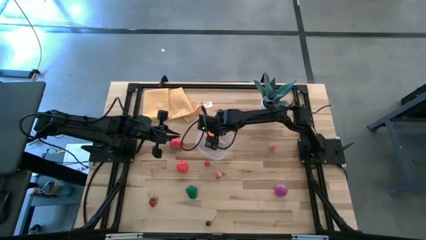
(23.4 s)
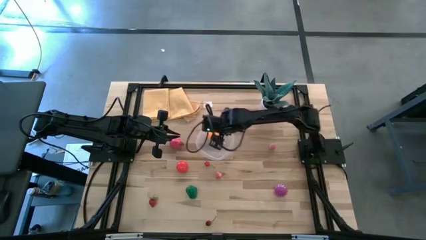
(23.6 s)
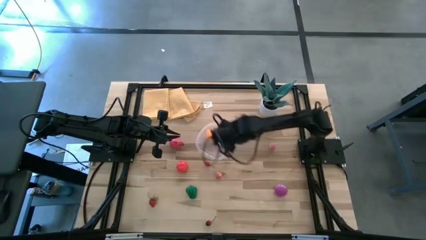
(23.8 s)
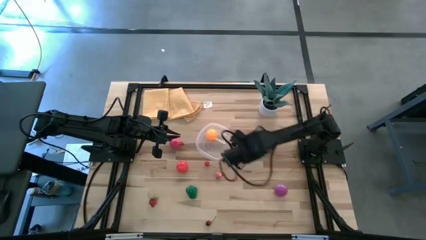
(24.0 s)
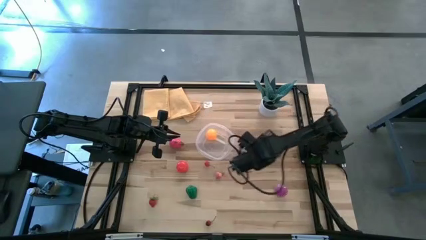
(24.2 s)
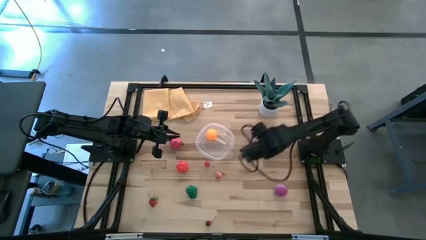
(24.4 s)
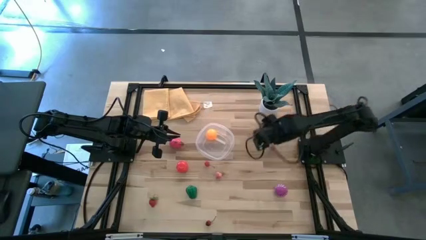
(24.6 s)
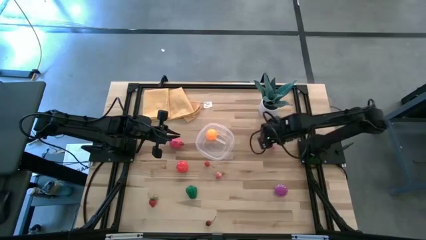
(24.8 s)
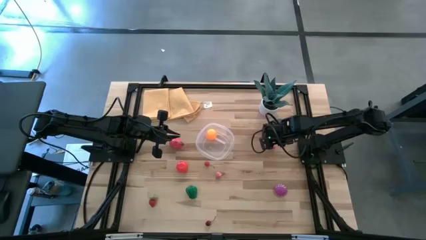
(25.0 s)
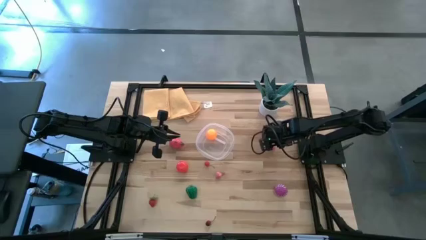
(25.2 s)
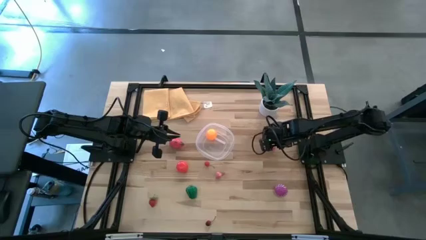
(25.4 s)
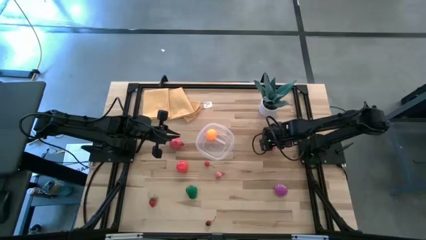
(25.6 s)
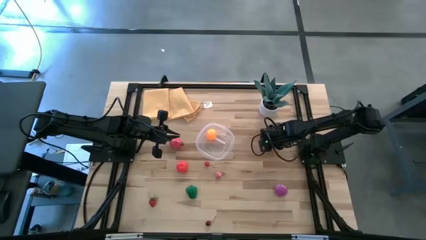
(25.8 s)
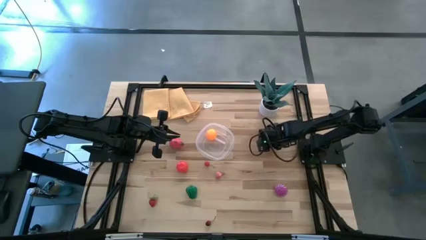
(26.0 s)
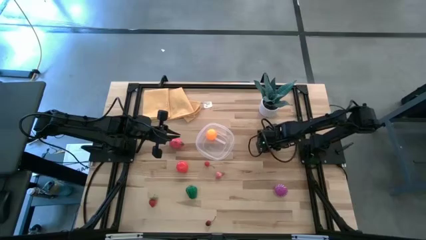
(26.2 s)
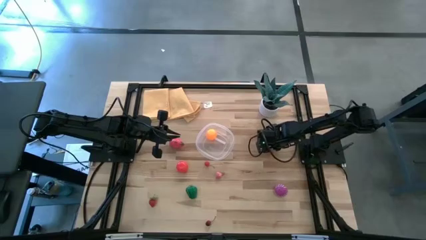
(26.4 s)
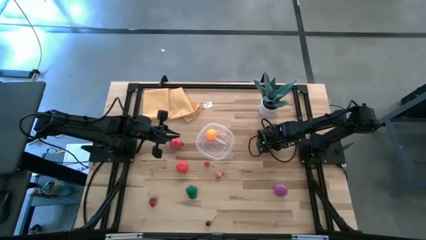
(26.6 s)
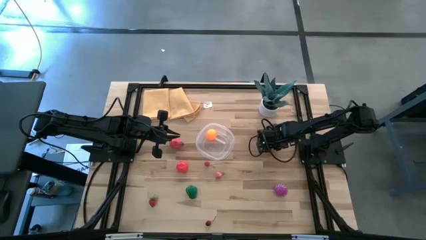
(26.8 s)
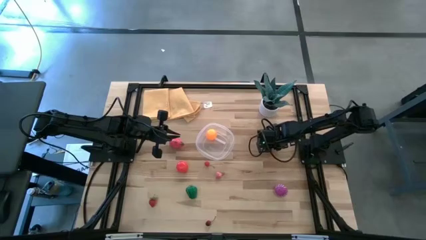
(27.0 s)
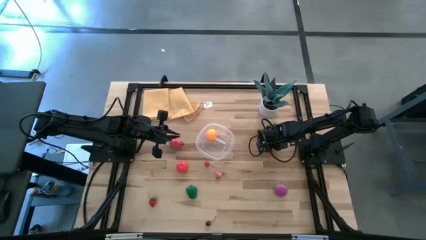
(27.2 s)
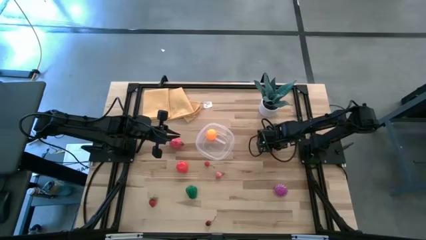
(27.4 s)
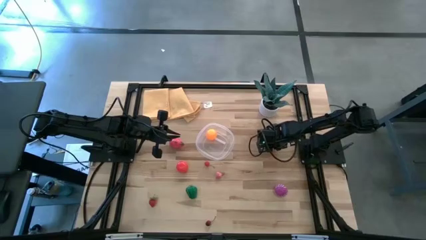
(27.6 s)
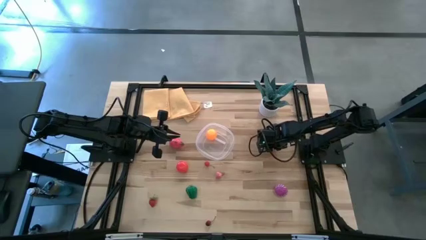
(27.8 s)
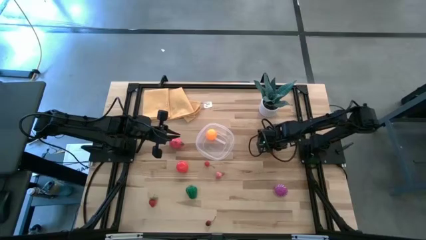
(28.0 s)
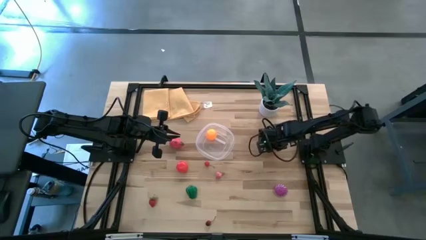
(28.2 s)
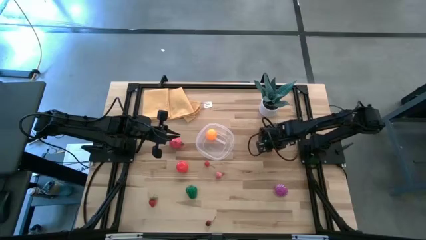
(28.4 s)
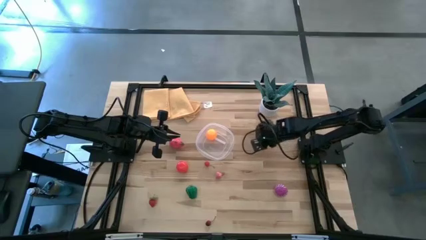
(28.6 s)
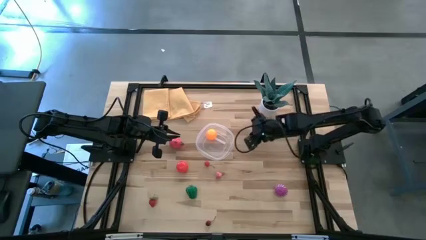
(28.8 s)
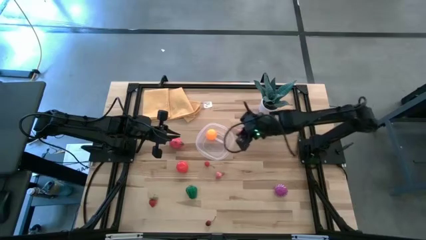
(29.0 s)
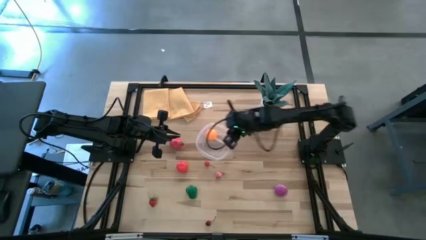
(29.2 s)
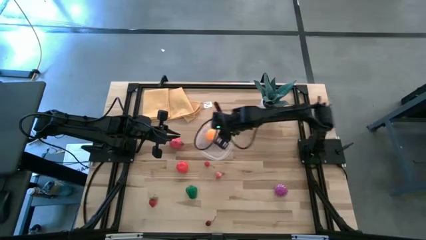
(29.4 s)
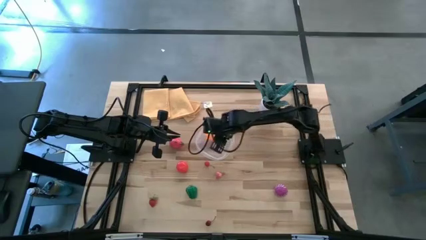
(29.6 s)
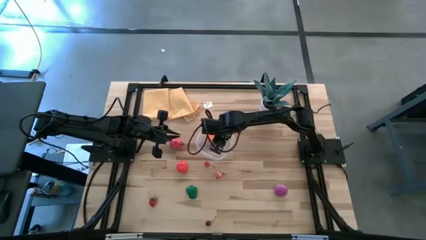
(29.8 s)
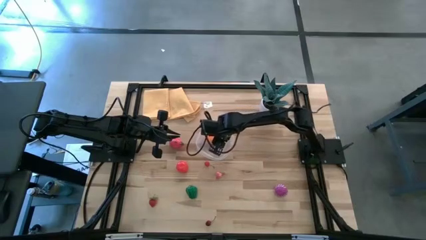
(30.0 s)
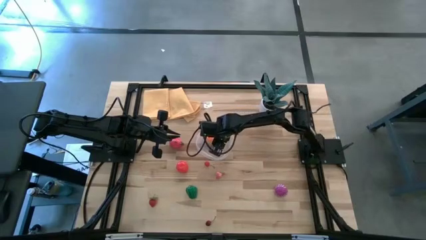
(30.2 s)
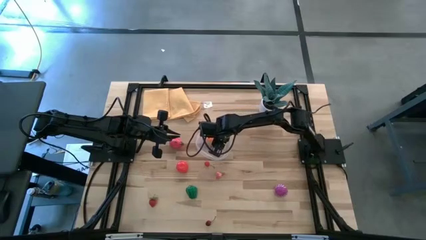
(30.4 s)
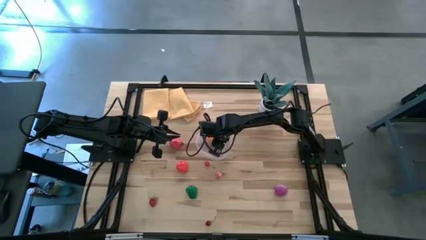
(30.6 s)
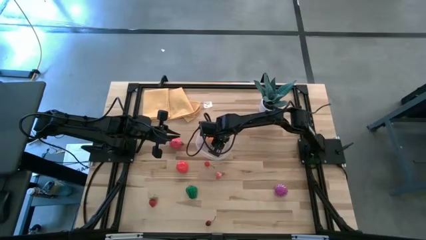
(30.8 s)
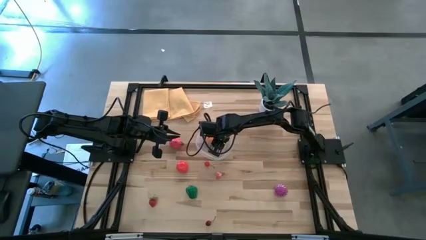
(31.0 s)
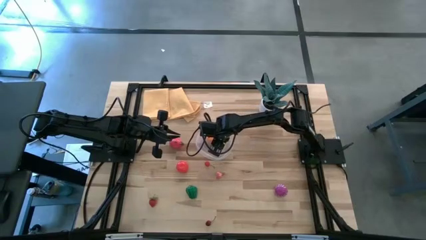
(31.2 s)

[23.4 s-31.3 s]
Task: Pick and placing Produce into tupperware
Put the right peach into the transparent bin

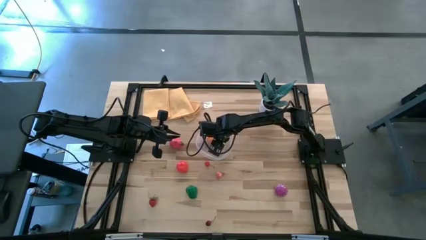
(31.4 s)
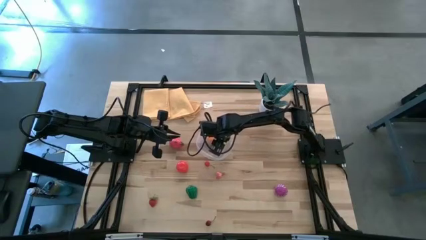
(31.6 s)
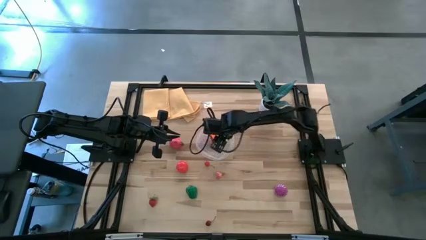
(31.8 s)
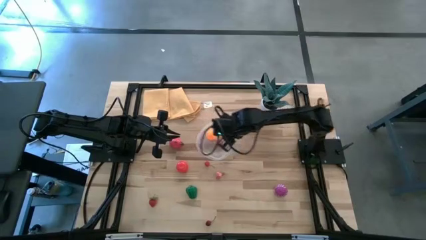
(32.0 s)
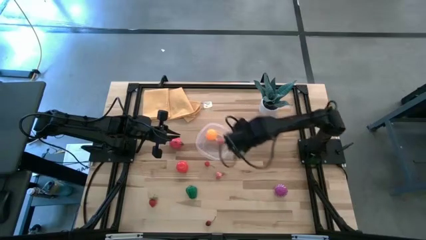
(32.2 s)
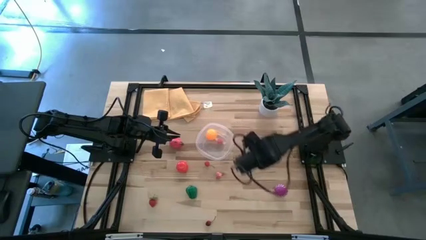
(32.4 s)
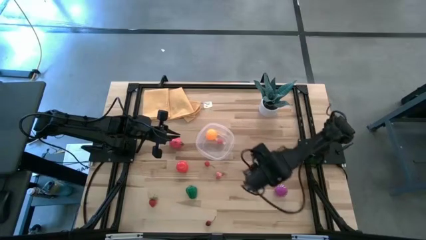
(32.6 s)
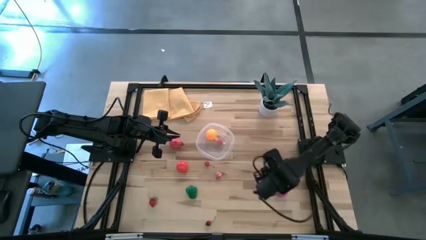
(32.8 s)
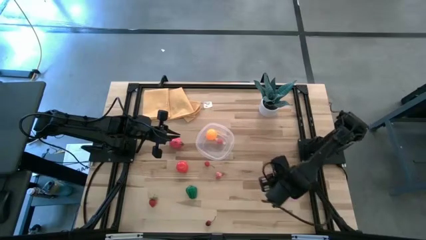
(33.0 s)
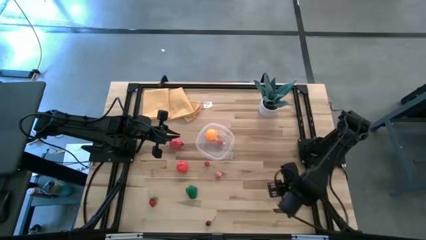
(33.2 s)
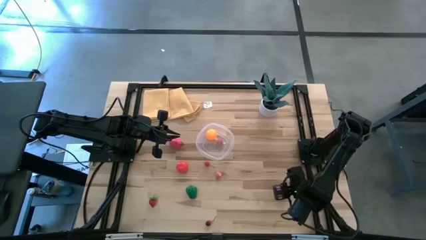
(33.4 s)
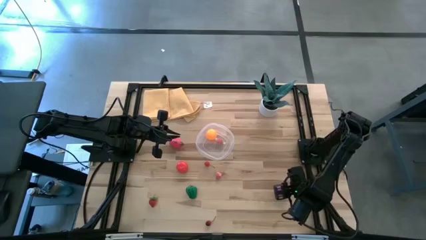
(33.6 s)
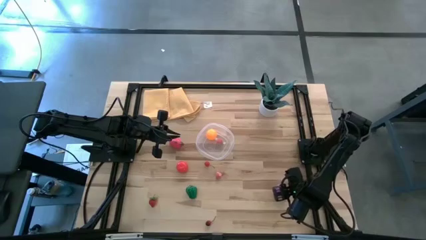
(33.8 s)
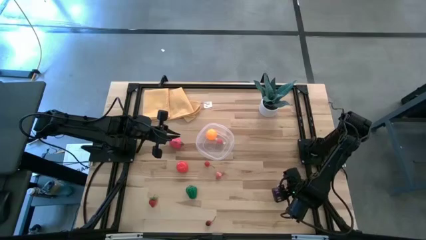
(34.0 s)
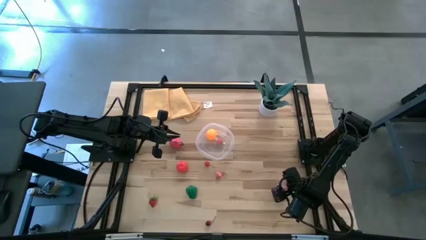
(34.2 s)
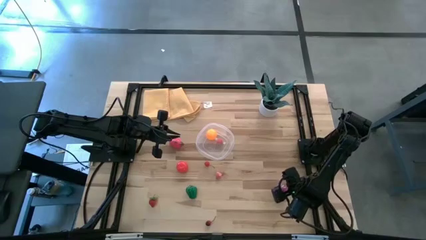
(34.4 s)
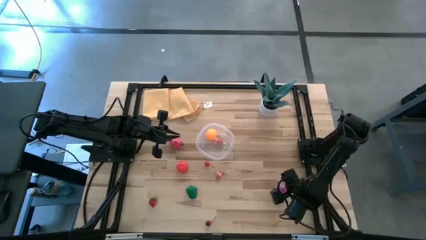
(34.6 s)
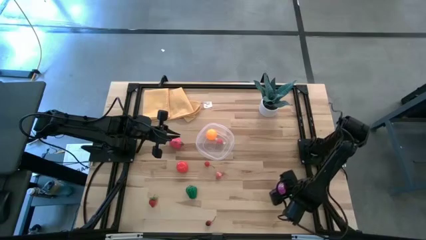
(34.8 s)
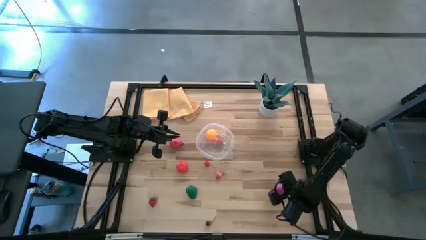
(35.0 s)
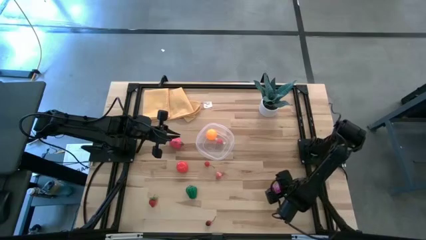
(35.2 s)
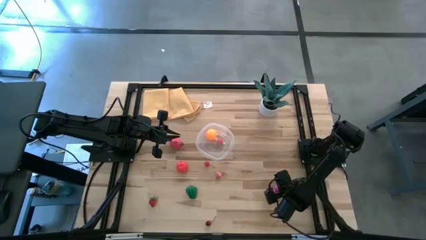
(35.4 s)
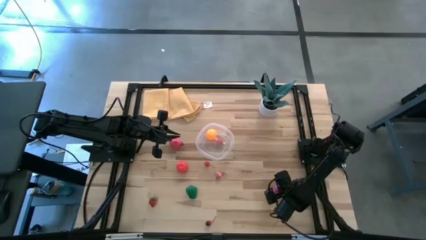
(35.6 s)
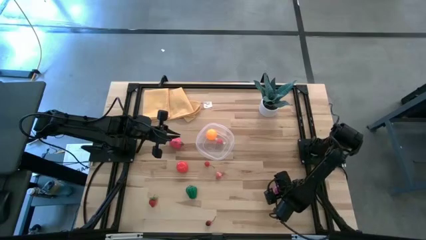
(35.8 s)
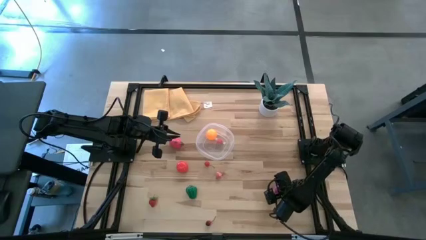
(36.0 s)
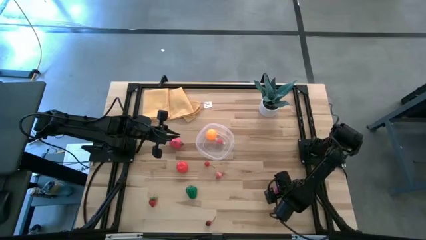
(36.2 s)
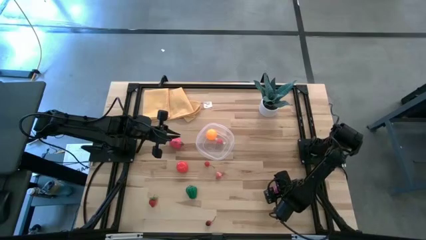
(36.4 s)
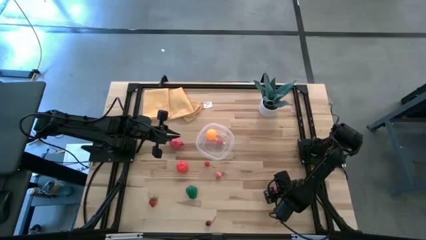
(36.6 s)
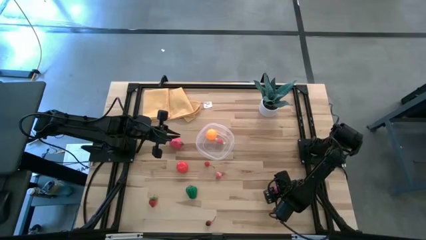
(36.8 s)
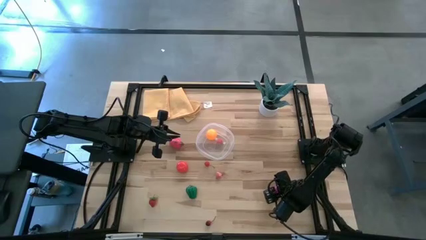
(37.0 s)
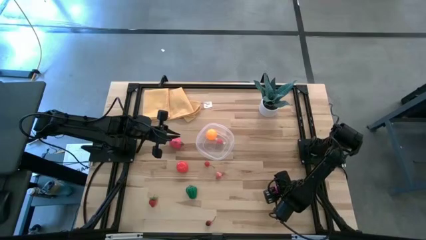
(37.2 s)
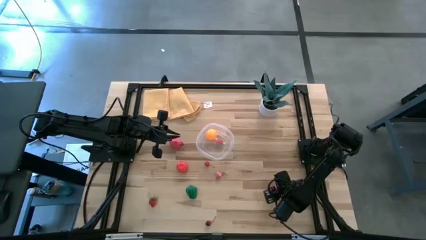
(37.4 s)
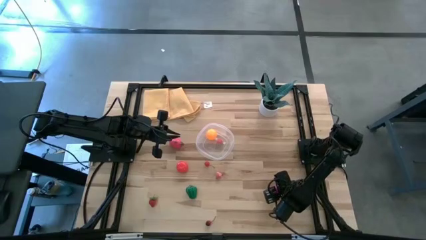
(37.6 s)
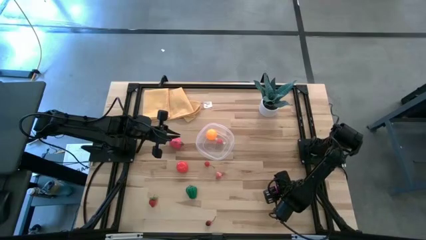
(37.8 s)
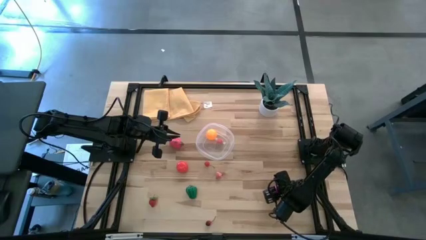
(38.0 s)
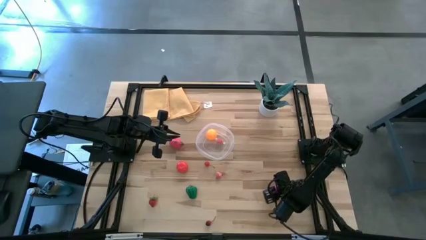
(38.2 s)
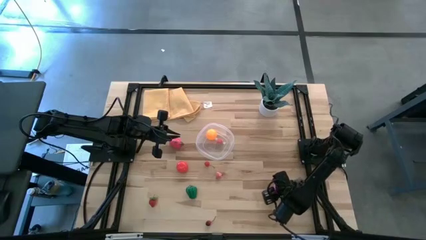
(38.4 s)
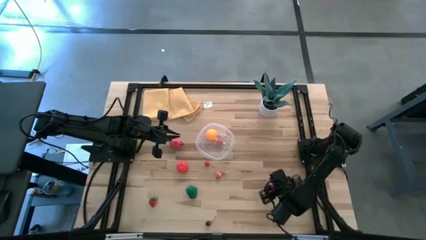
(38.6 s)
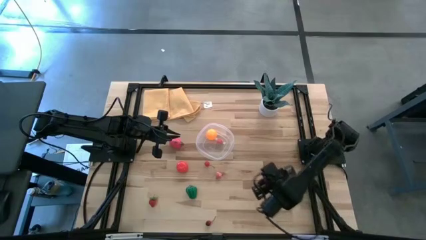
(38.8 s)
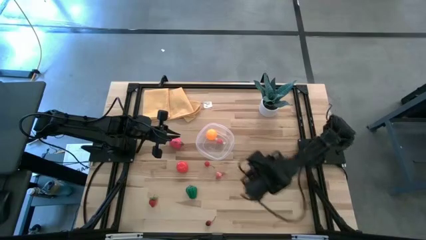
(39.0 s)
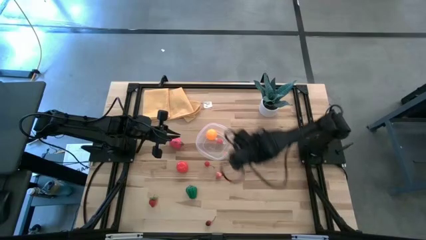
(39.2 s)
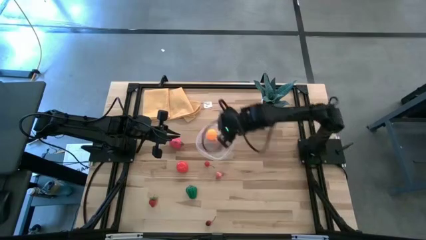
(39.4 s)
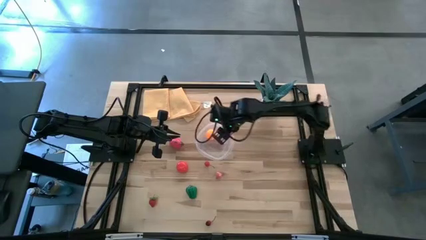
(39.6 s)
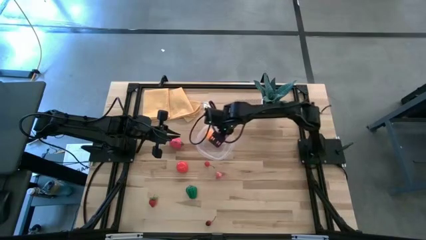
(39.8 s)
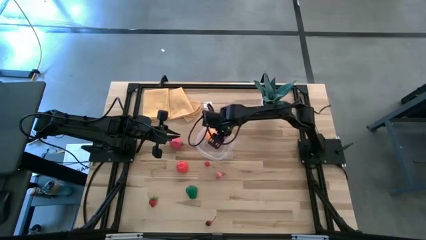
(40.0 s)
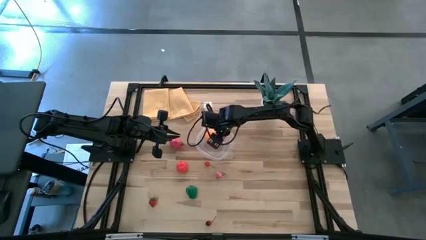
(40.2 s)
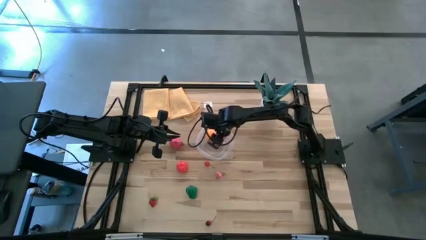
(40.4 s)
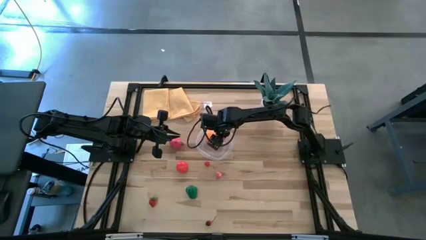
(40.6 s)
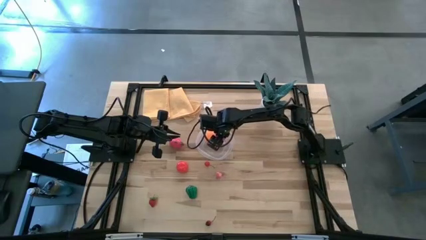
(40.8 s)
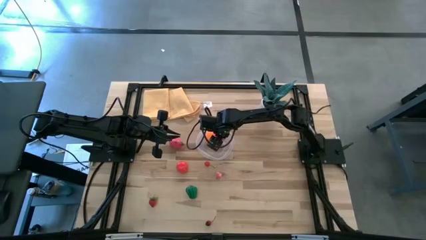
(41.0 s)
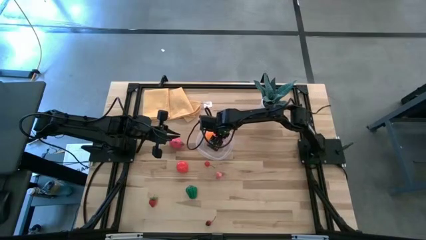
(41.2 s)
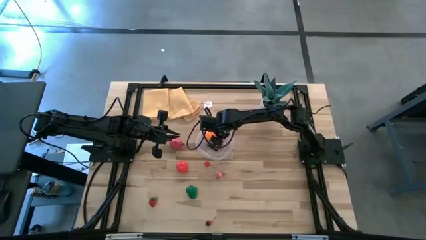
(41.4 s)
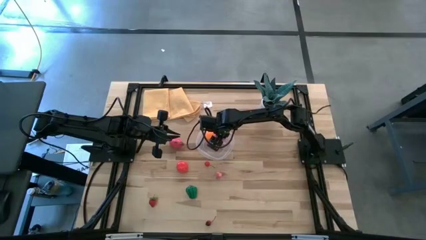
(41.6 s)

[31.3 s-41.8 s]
Put the onion into the transparent bin
